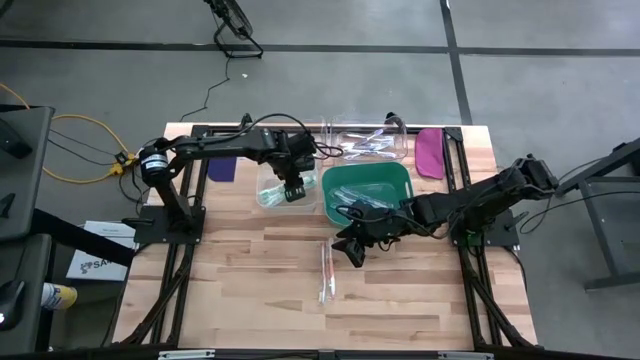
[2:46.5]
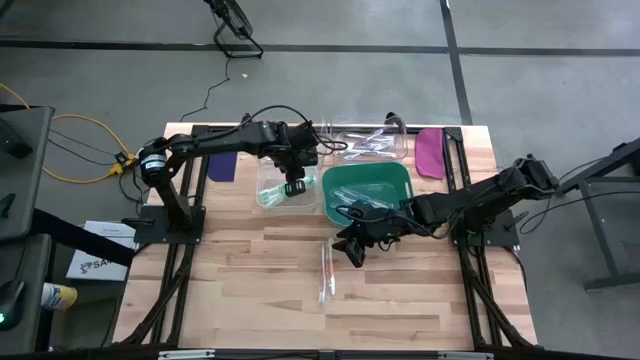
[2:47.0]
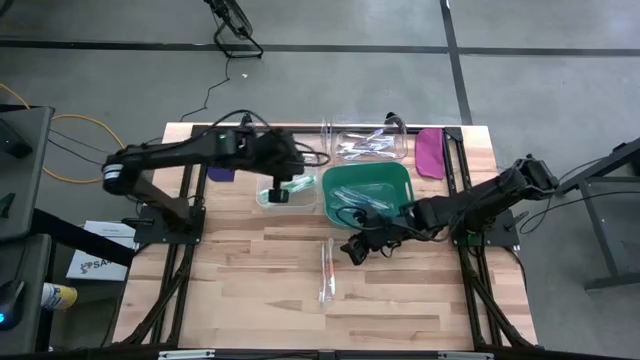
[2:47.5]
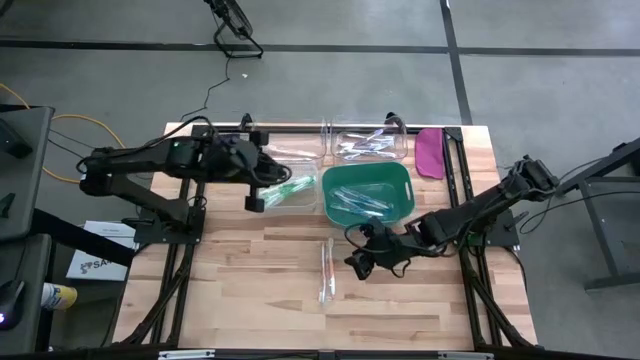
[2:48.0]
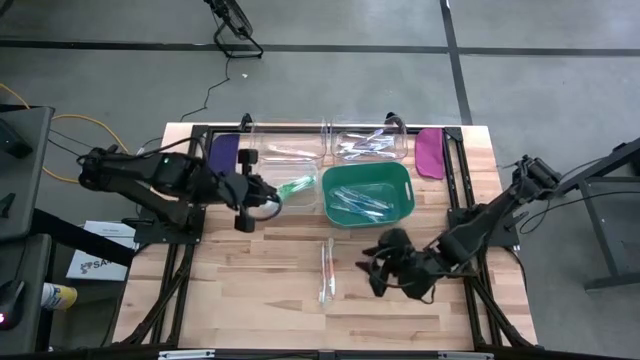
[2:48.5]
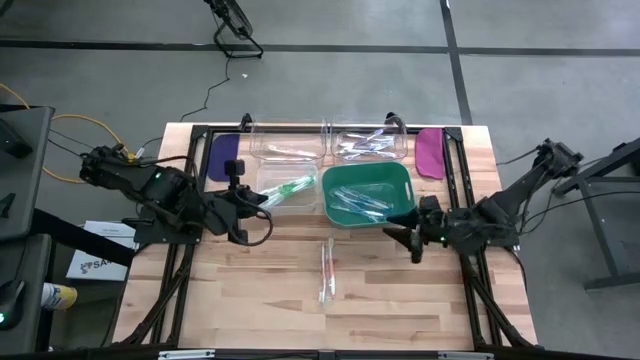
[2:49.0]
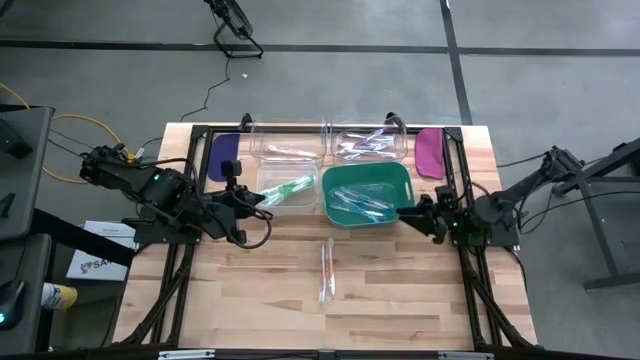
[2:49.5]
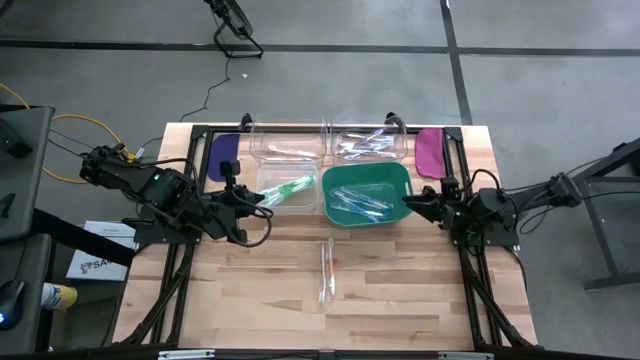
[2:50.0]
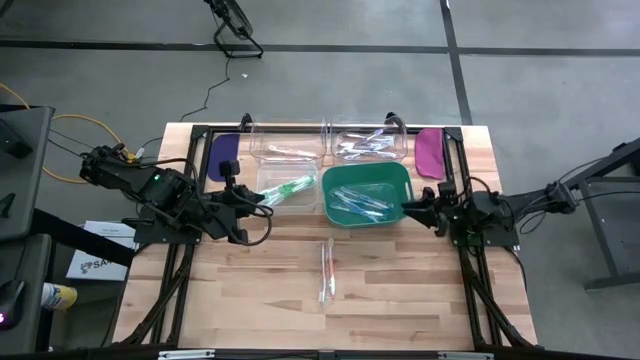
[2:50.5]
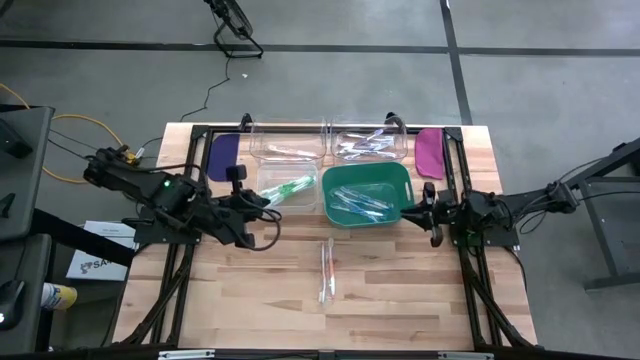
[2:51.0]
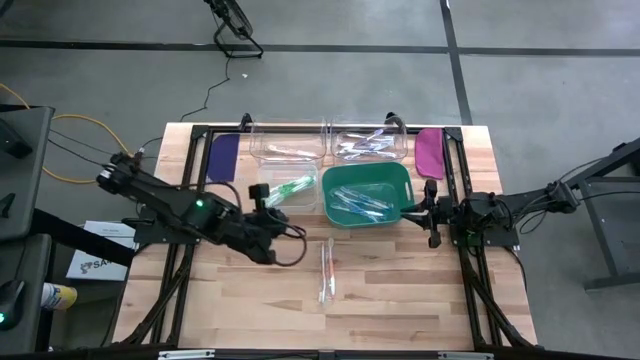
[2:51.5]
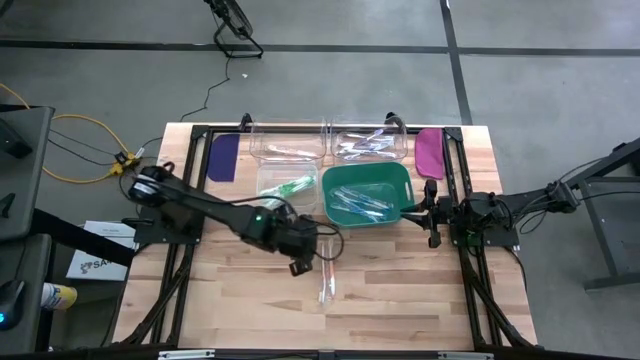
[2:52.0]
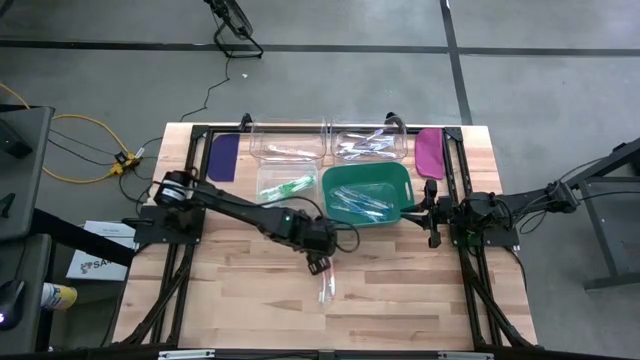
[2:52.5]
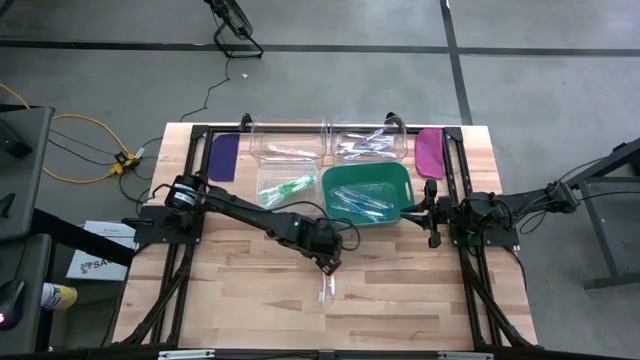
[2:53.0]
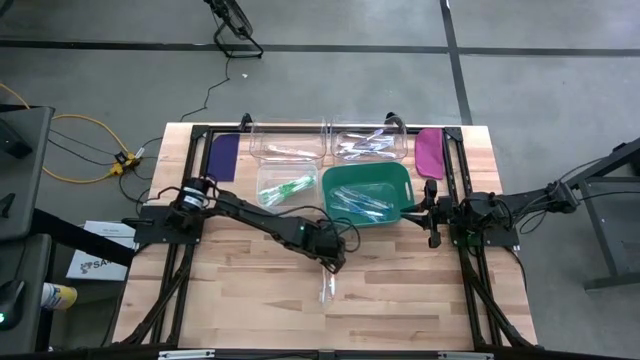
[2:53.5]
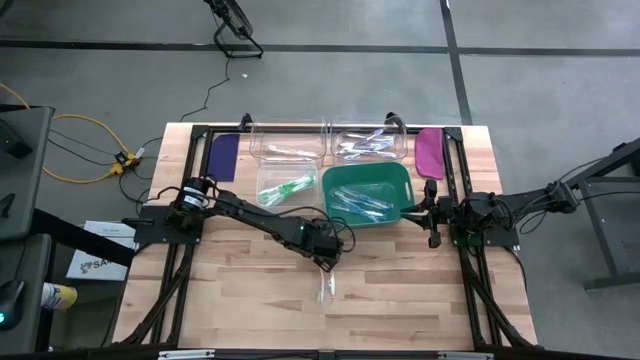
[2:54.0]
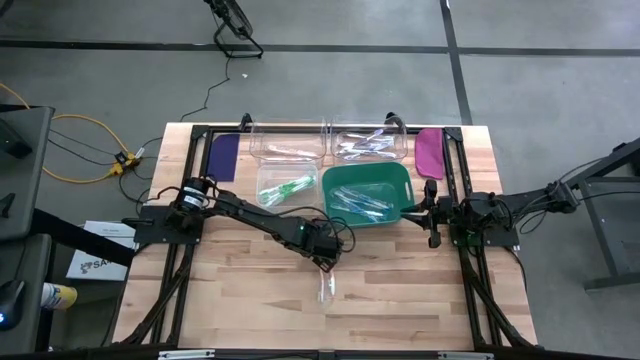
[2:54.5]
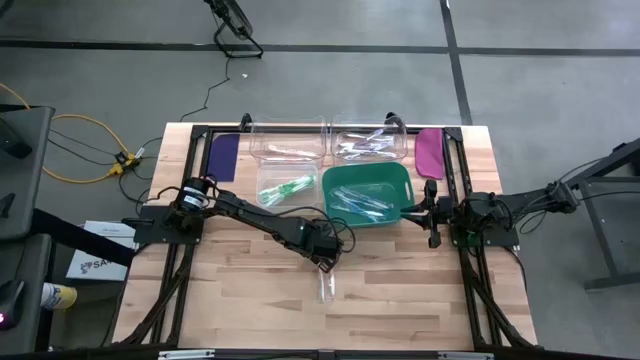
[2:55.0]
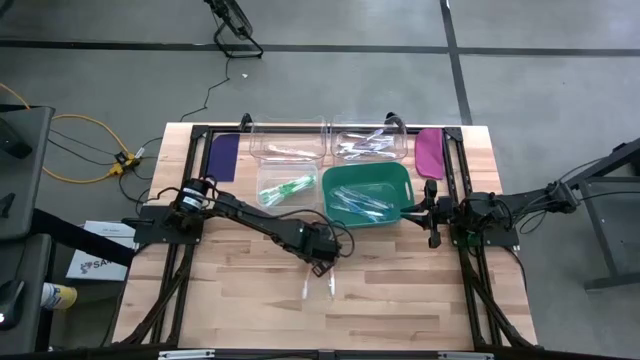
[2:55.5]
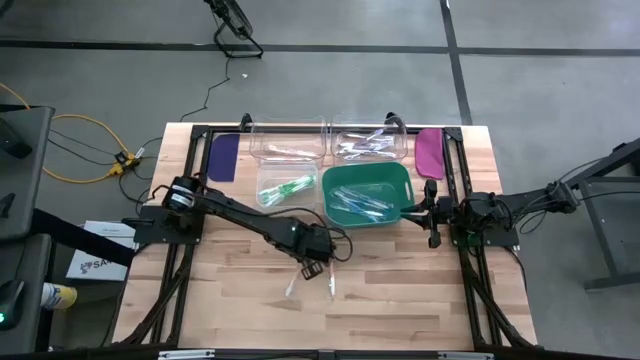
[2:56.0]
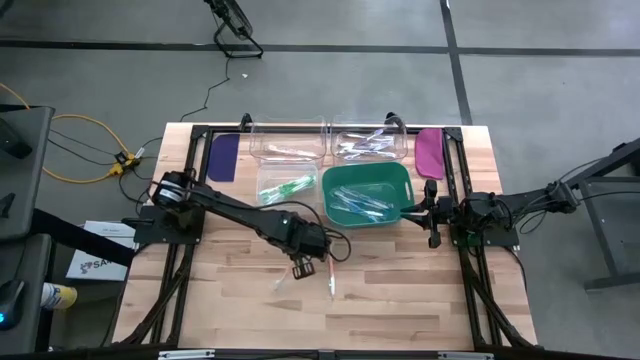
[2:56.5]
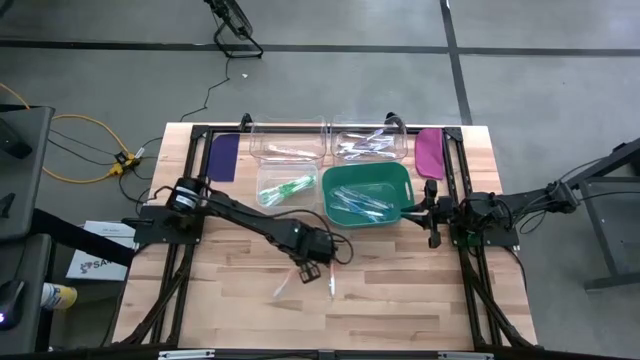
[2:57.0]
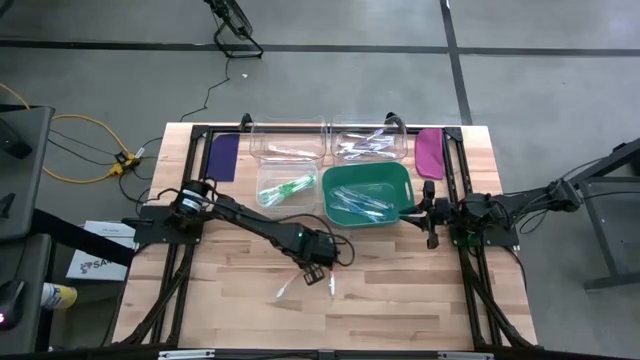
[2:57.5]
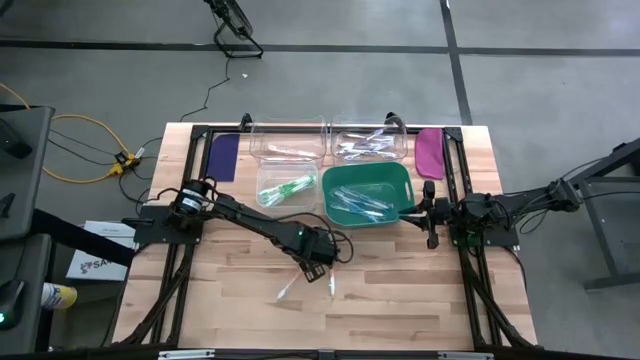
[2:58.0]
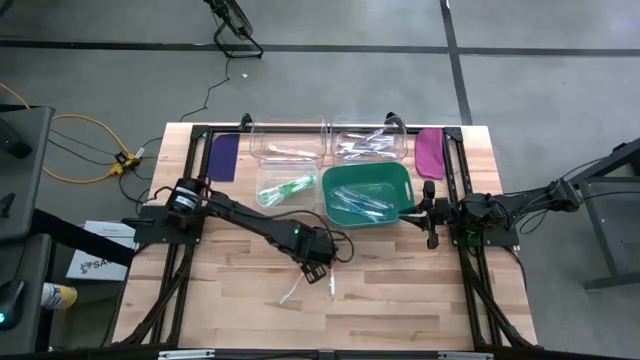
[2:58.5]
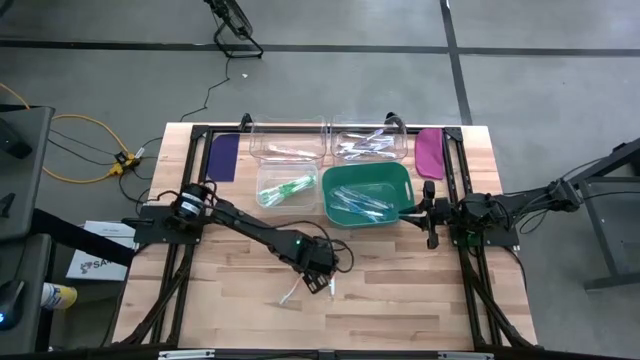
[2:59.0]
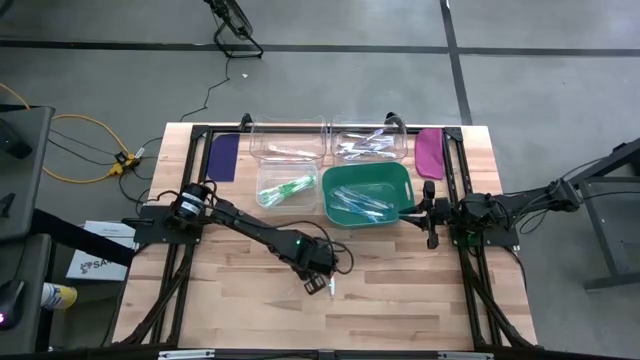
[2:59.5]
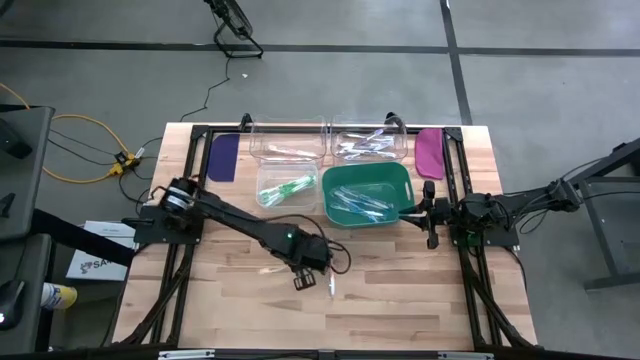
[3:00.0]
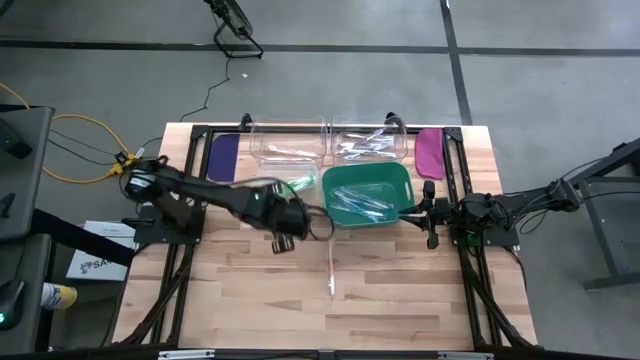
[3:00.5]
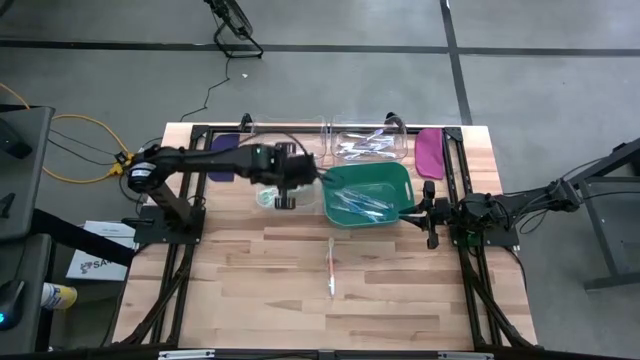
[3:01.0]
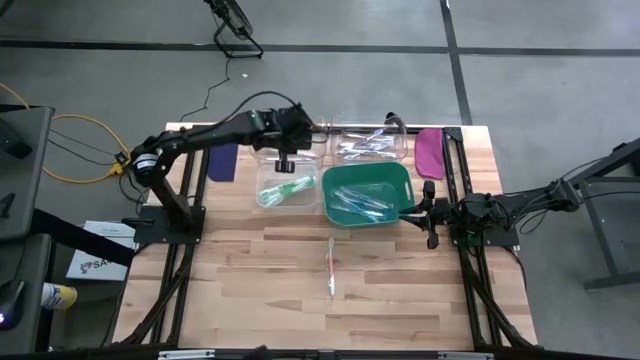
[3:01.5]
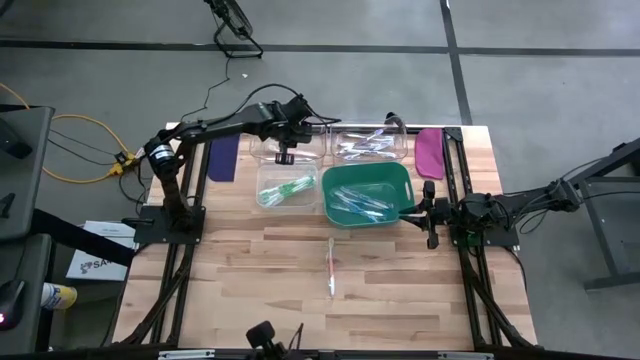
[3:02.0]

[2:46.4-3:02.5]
Task: Pick & Place Toothbrushes
Put the orange toothbrush into the left transparent bin

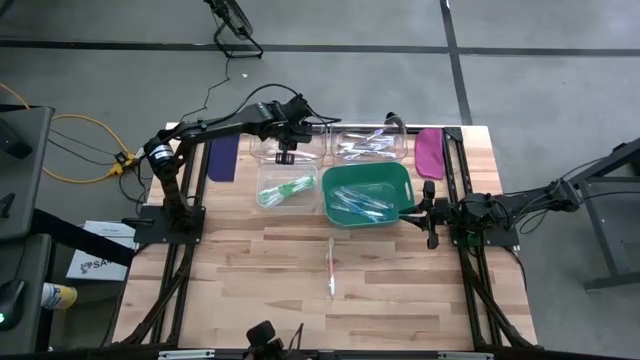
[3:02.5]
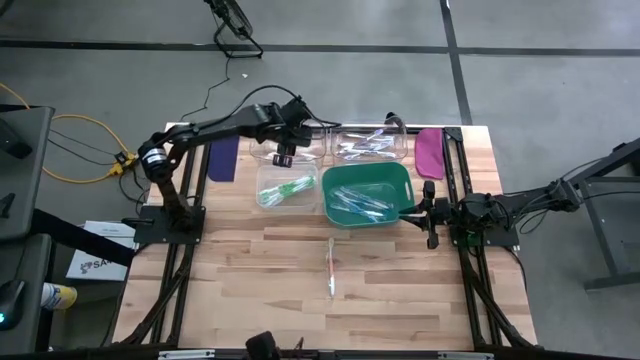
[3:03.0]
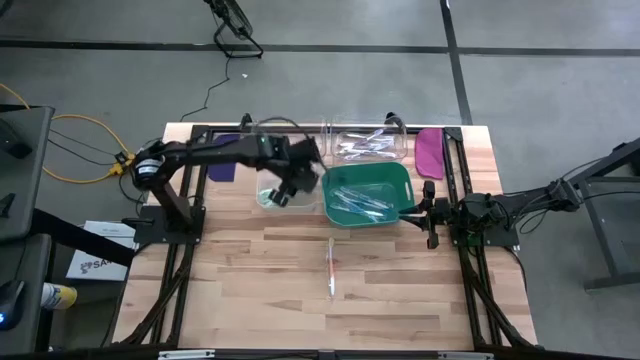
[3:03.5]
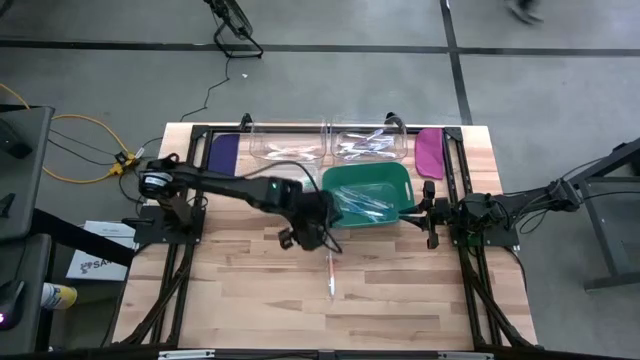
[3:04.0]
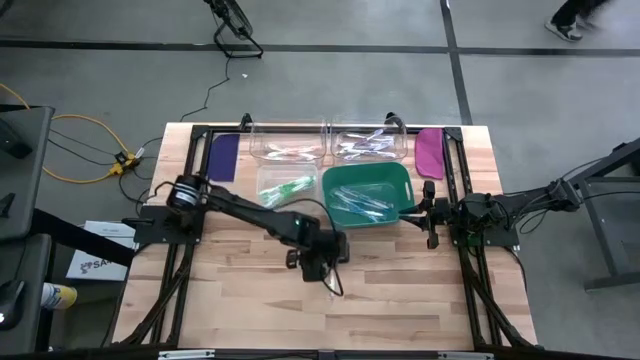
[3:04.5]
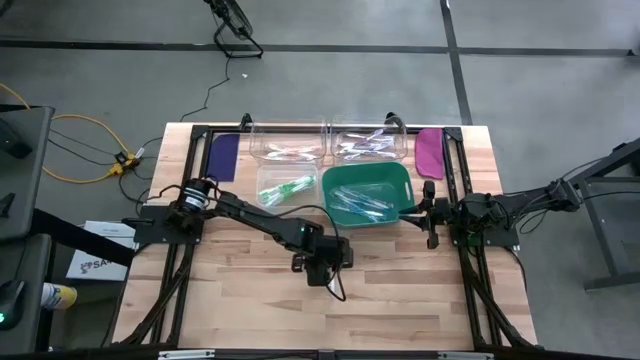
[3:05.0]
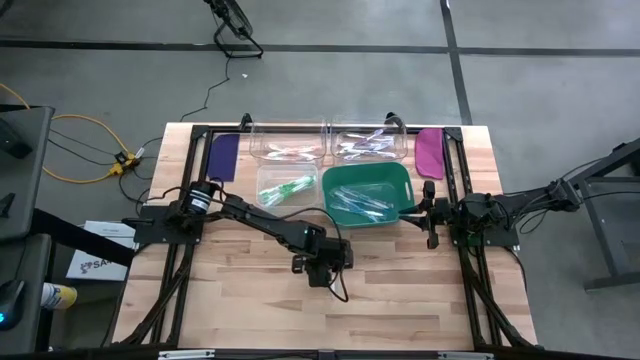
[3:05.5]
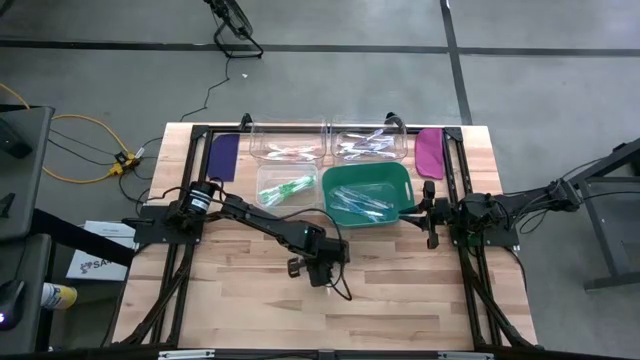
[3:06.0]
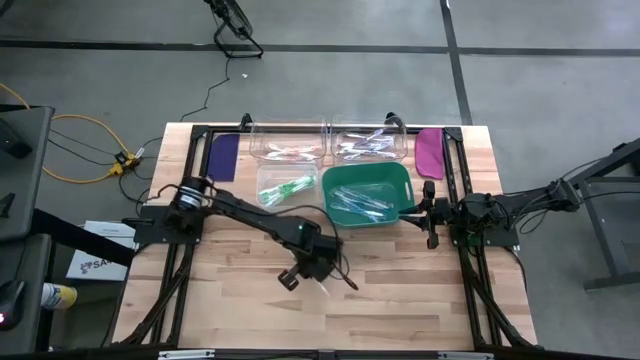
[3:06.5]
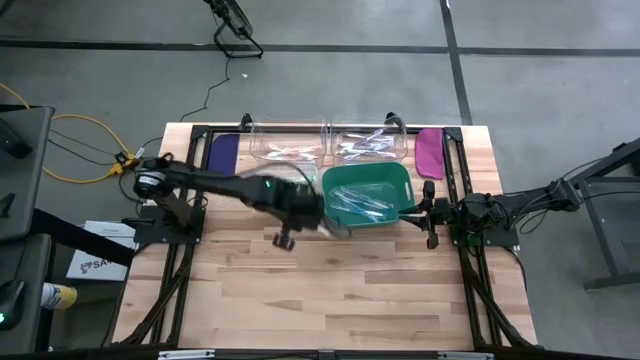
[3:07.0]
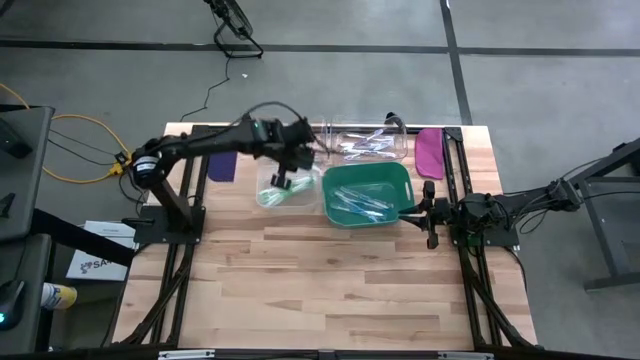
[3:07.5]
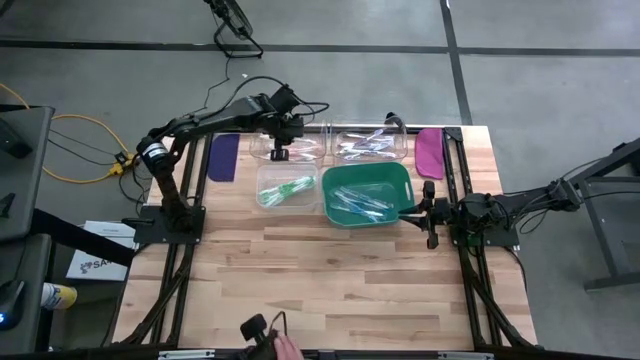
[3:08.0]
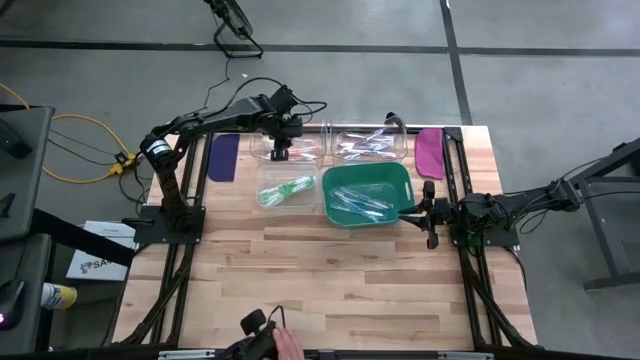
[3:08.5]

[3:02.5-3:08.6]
Put the orange toothbrush into the left transparent bin
